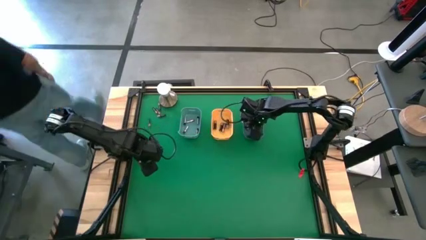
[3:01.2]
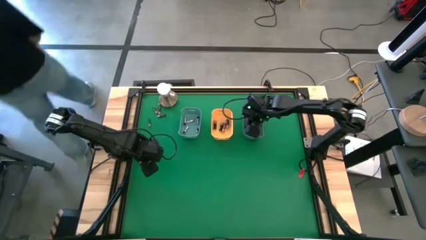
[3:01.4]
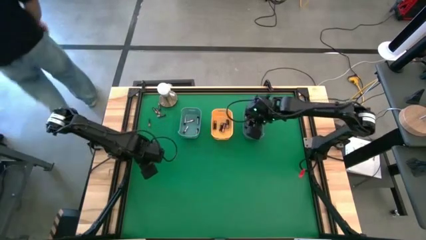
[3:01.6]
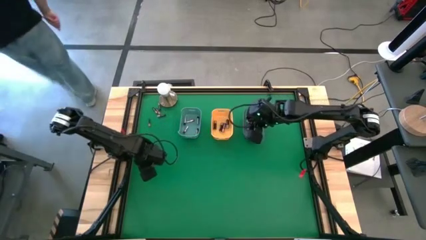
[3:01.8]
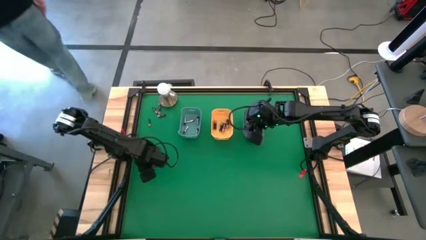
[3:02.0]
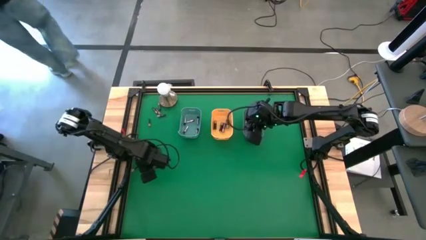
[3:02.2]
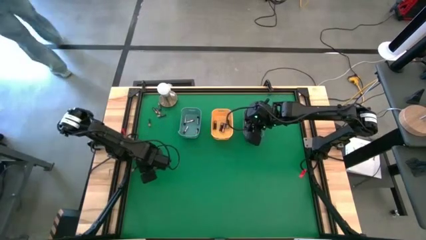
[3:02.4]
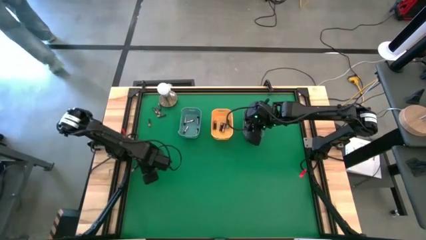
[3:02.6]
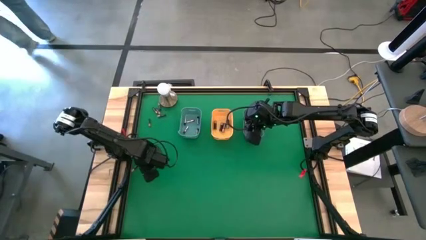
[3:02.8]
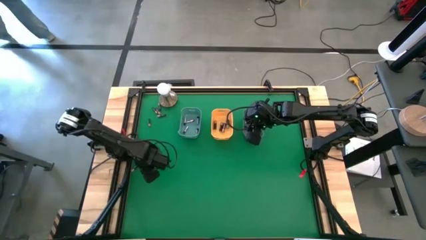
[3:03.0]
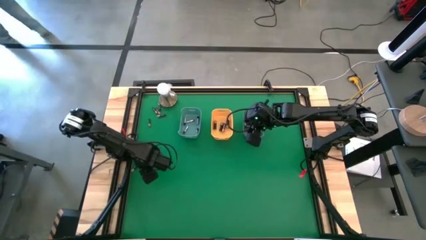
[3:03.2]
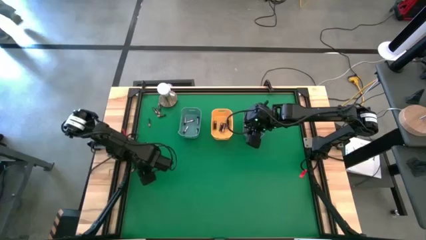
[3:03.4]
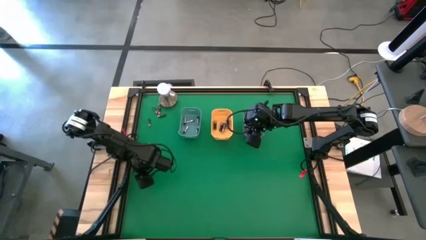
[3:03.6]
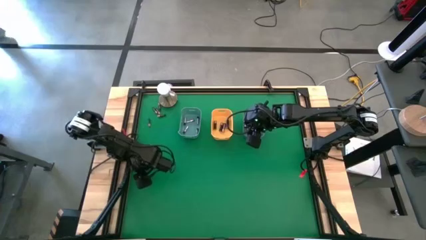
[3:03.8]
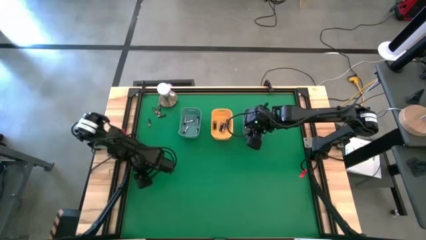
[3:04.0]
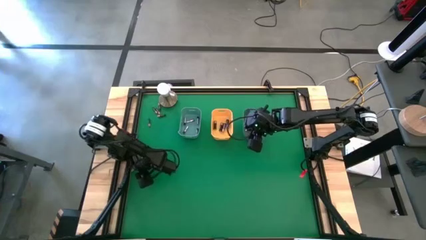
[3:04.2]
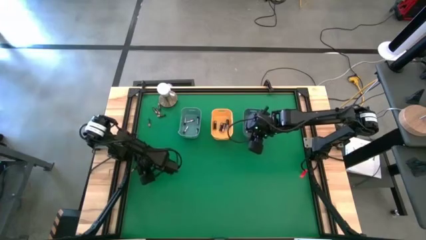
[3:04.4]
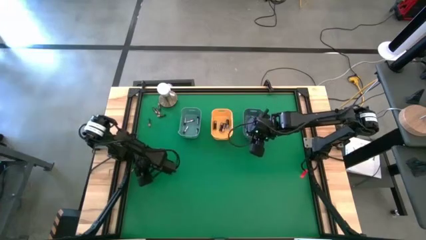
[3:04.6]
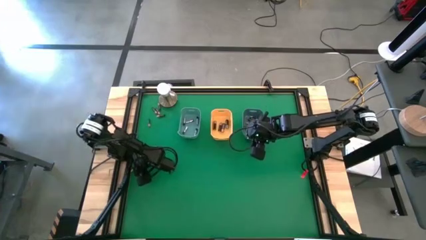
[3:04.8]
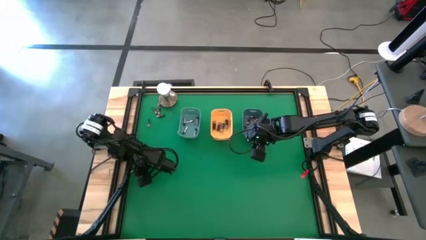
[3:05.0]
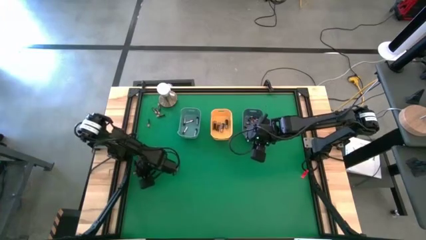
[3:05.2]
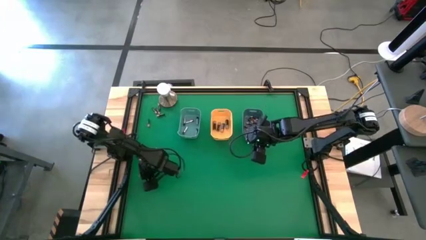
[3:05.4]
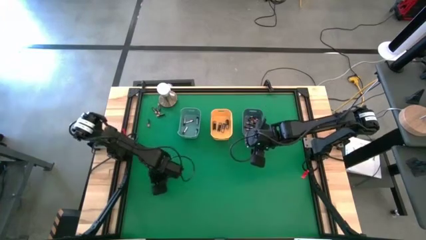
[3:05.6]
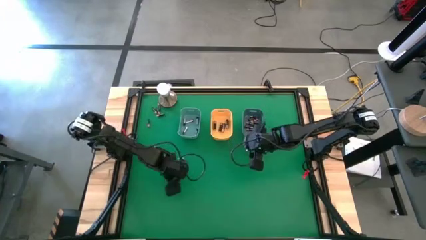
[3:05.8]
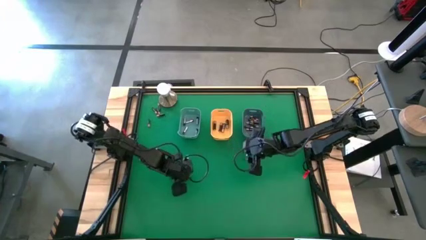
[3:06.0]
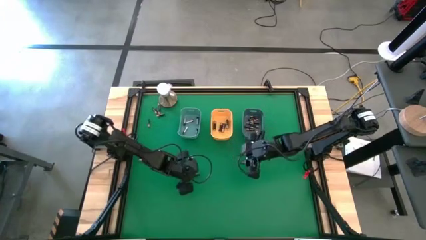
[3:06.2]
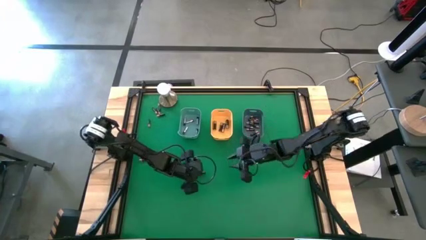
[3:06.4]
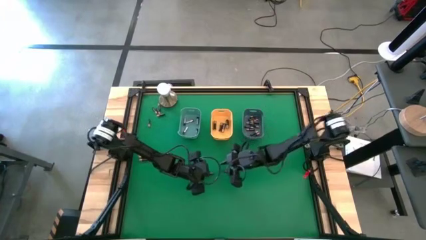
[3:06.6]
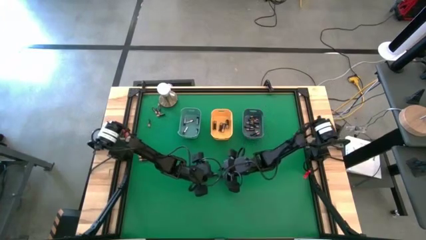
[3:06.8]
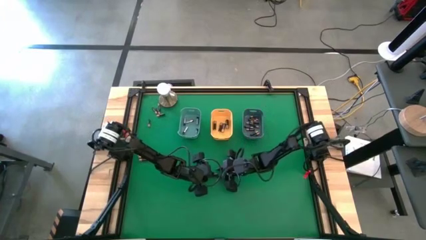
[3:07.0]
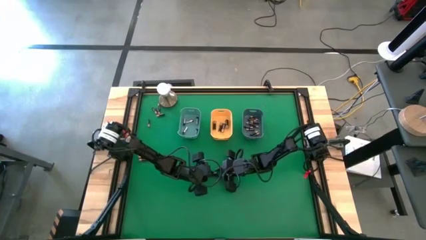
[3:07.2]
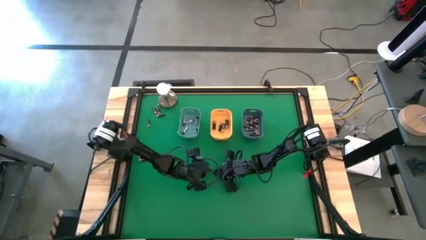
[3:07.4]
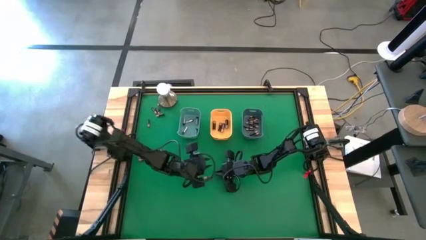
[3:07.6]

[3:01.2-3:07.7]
Task: Sort batteries
Put the small black battery into the blue bin

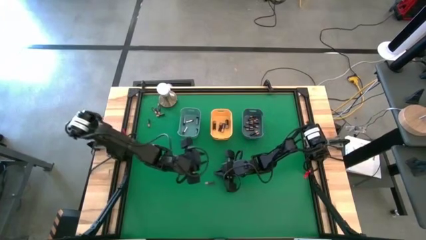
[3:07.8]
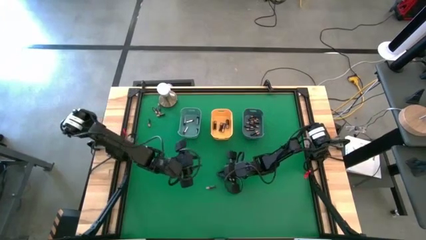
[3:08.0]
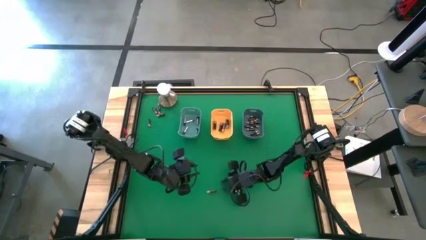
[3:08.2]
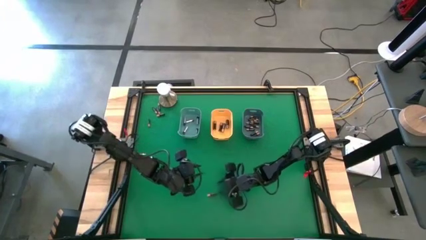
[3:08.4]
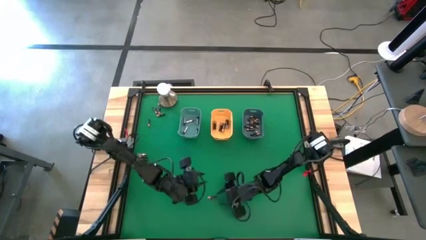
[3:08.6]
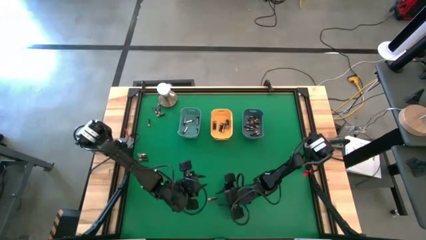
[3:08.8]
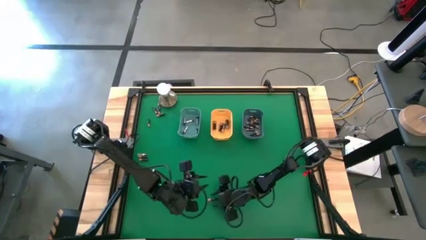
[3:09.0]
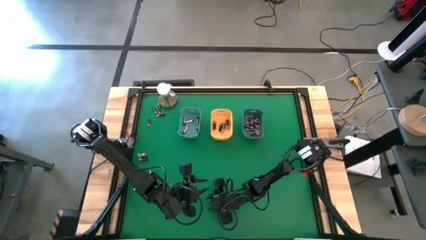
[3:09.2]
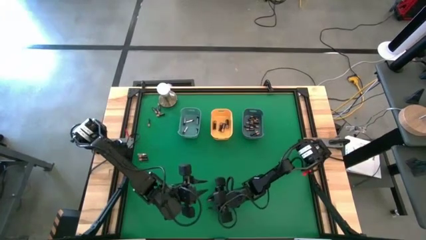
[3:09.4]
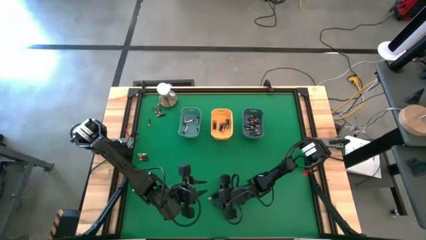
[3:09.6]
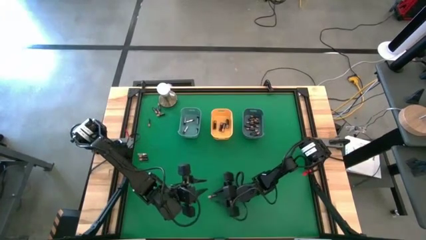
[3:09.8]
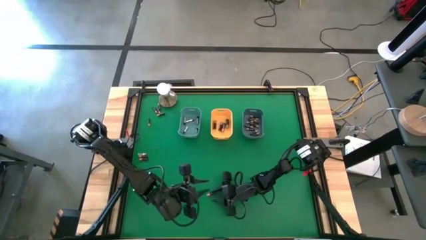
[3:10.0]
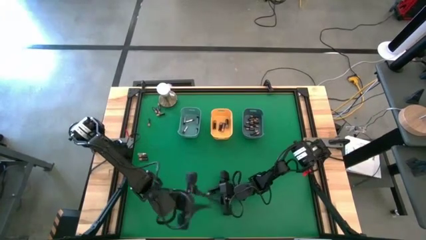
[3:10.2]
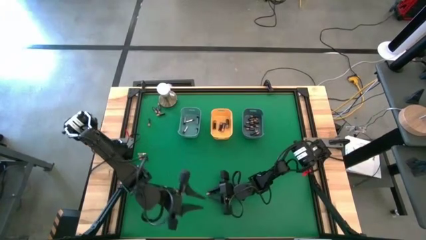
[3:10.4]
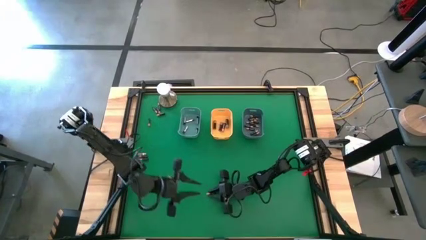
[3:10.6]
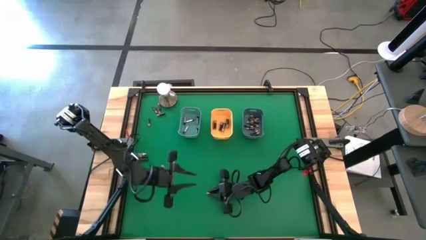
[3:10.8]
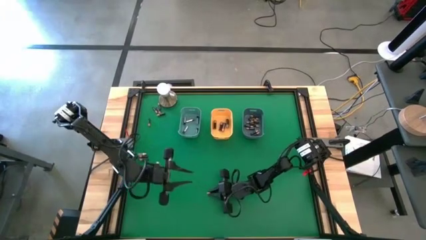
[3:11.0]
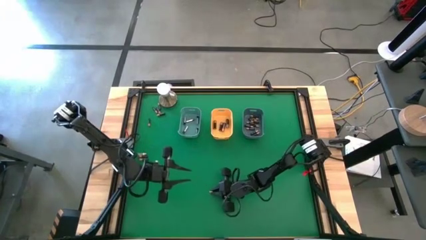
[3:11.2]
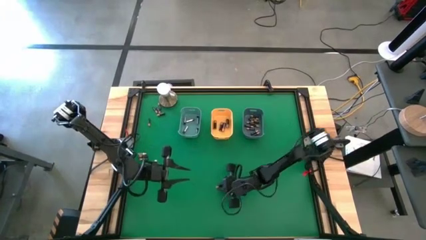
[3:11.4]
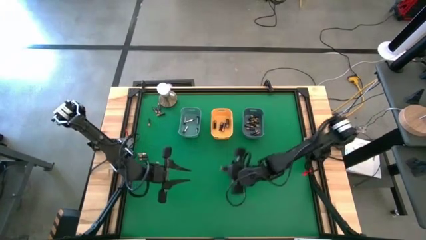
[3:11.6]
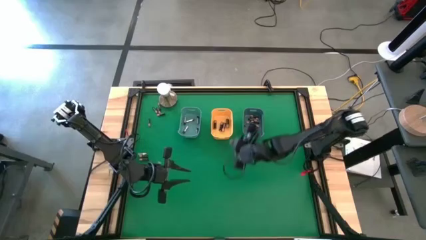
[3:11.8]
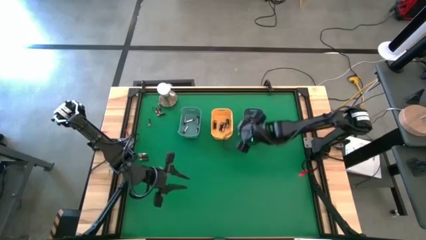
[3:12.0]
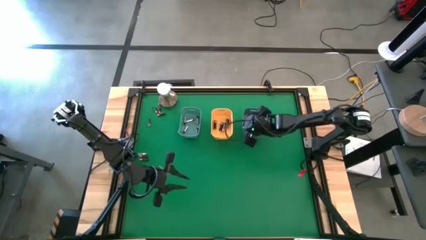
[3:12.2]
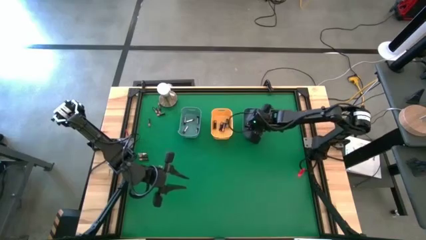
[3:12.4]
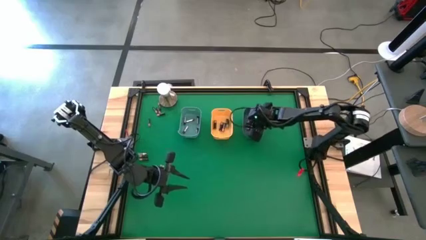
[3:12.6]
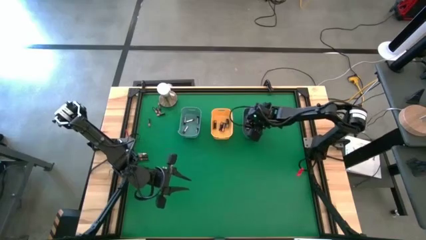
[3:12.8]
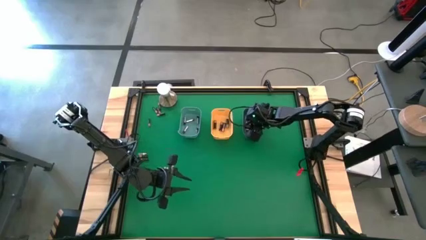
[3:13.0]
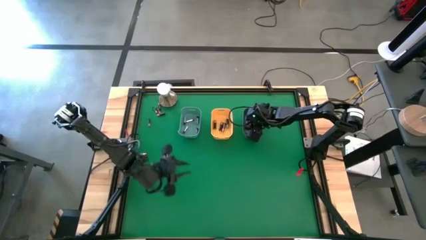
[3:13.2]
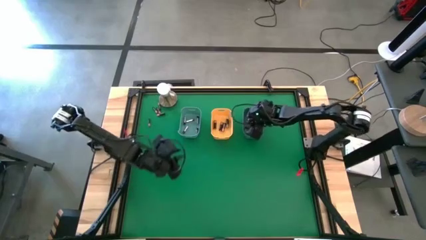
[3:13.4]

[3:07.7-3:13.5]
Put the small black battery into the blue bin
